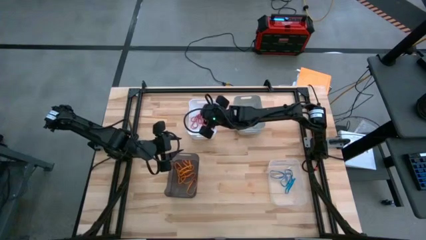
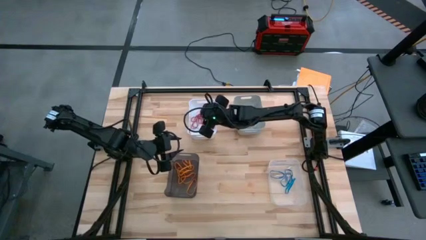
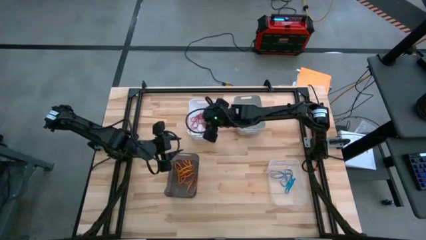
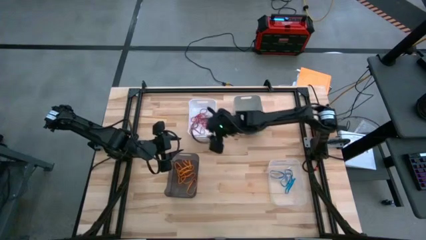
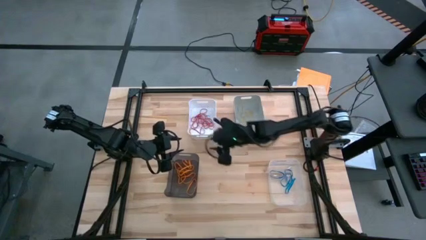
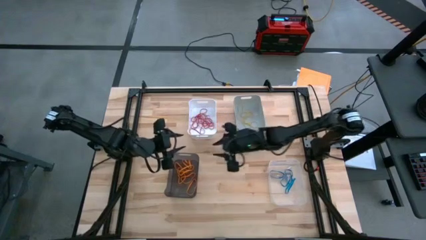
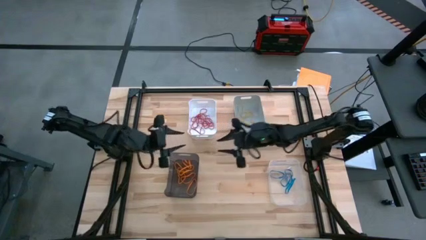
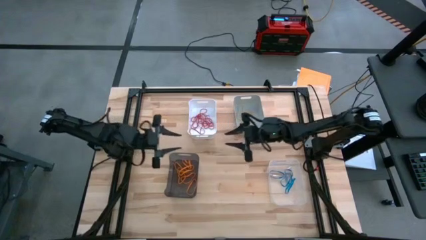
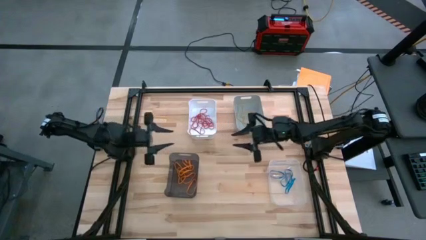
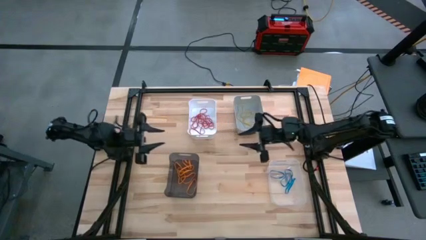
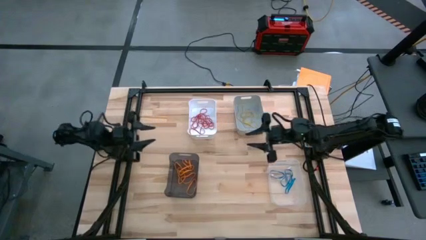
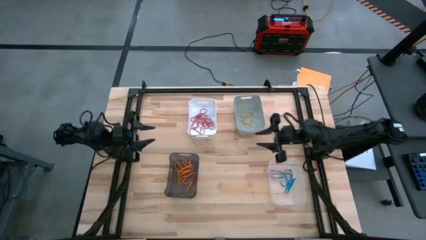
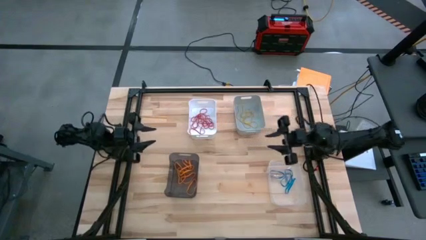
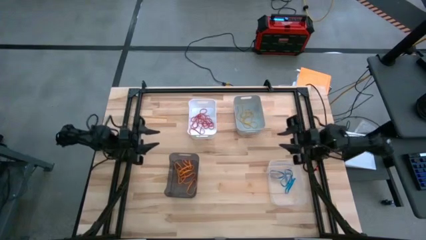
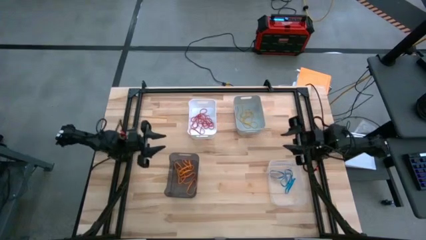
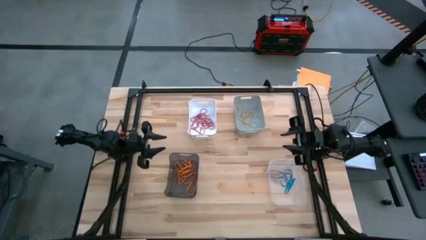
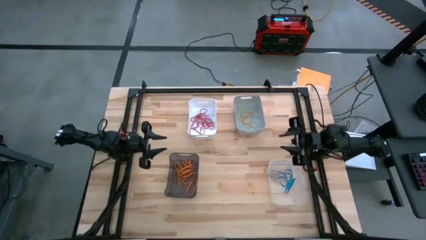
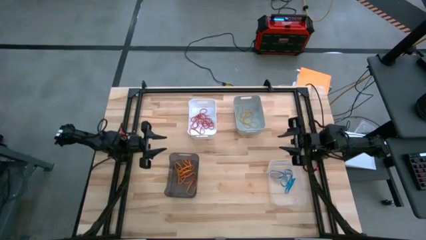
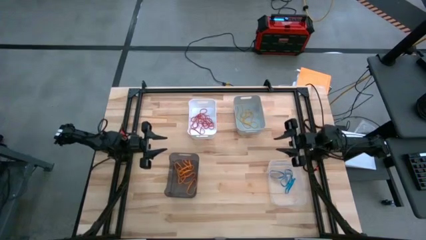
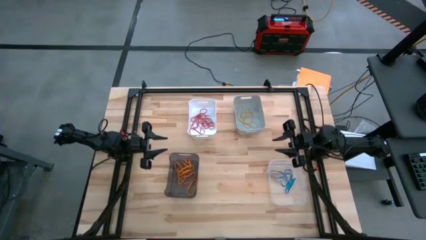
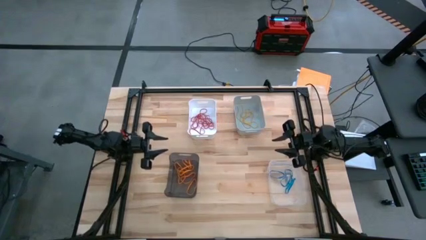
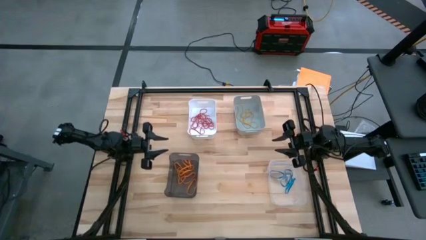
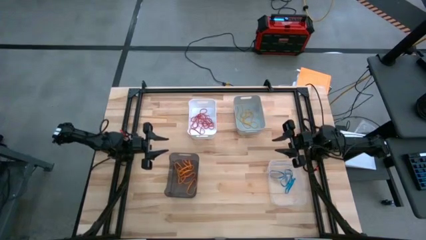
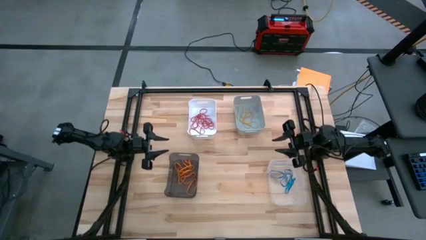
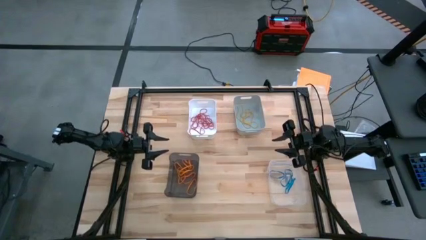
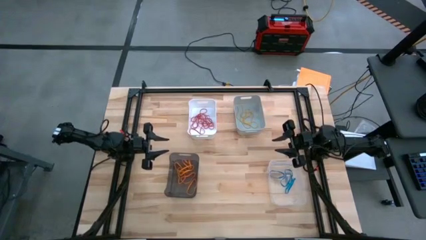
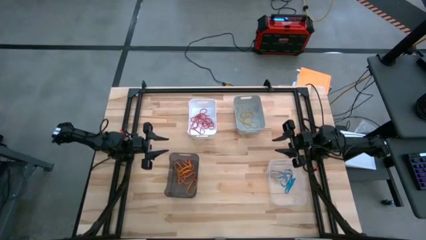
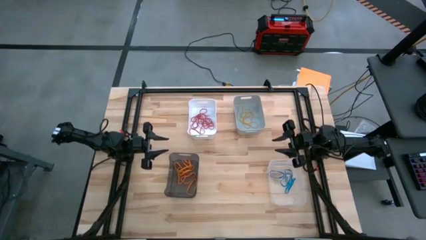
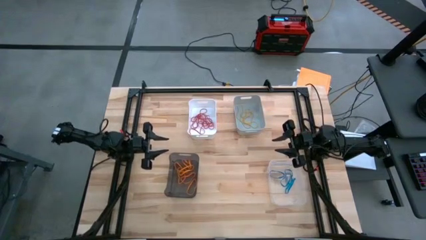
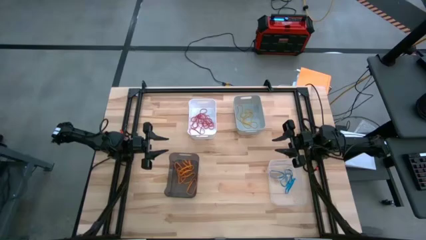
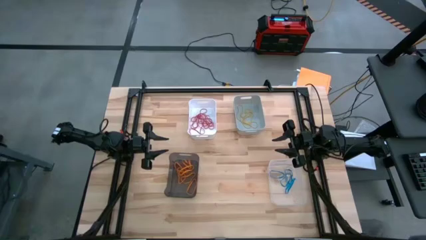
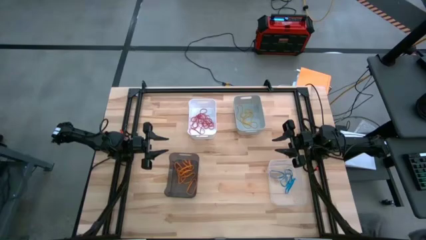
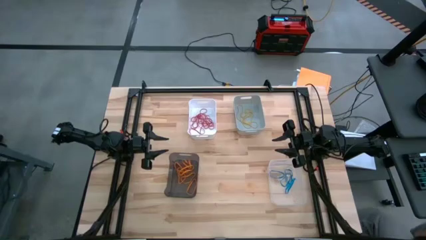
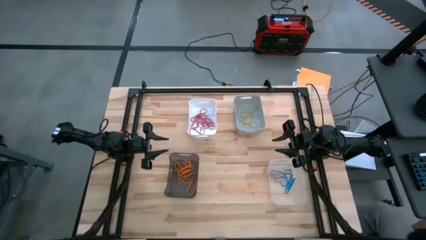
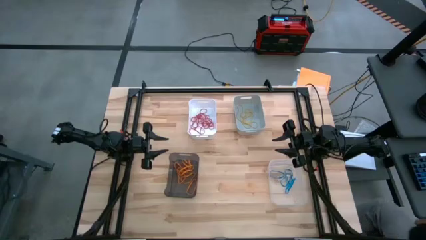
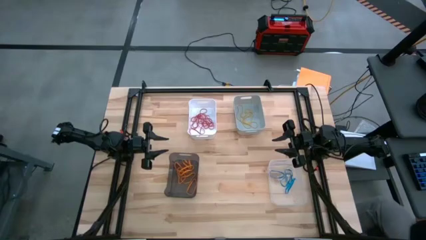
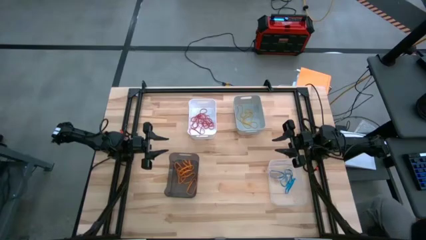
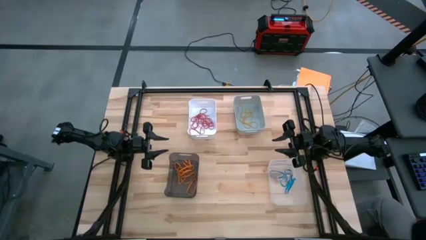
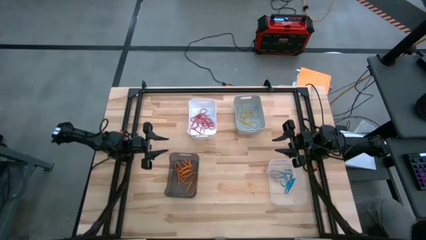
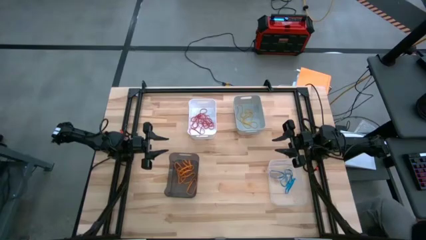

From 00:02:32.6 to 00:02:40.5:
Task: Sort rubber bands into baskets
Return to Home Position

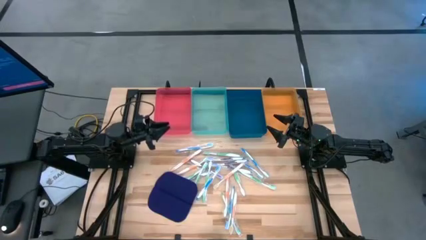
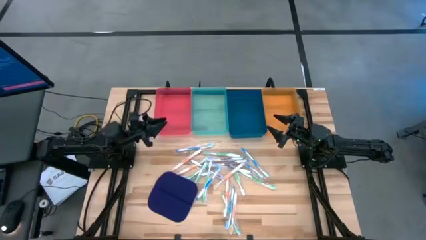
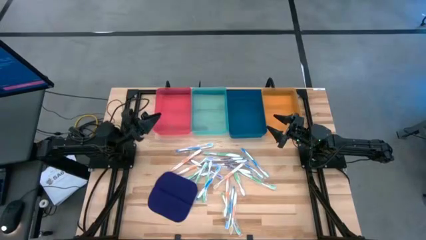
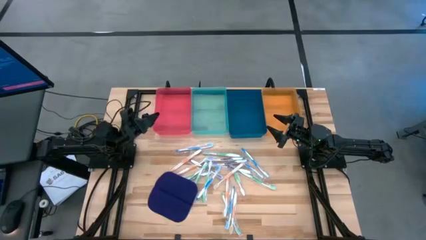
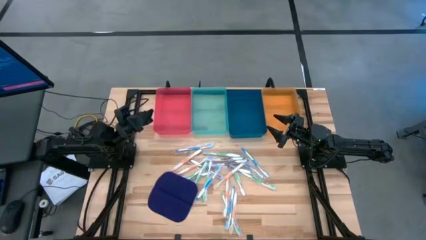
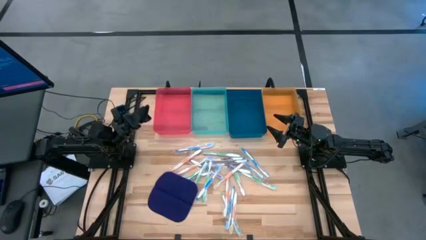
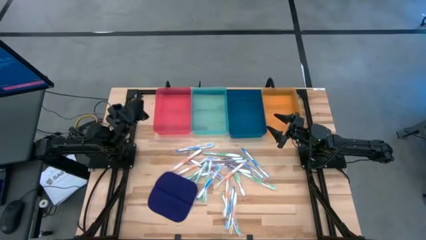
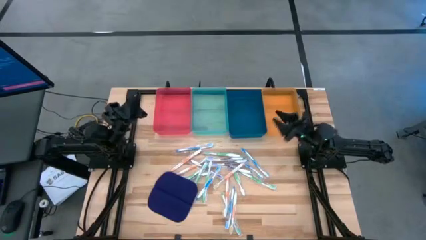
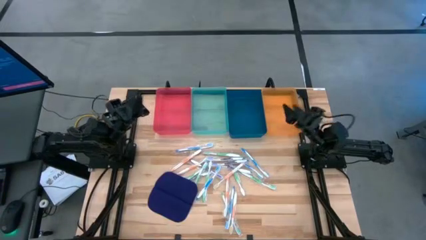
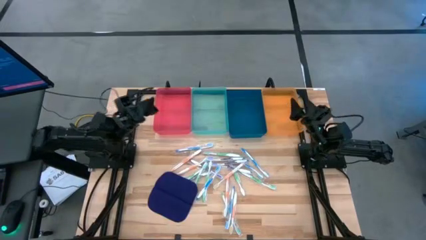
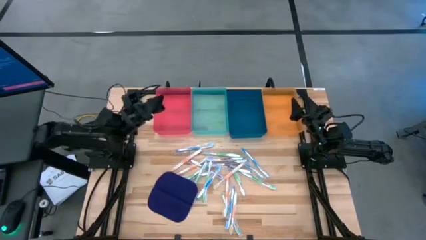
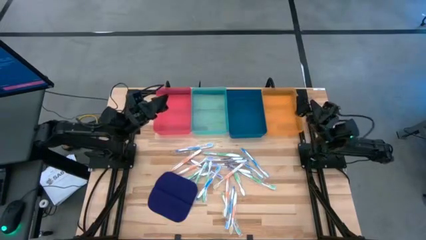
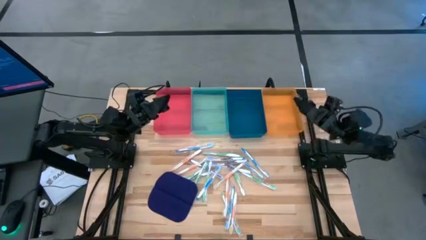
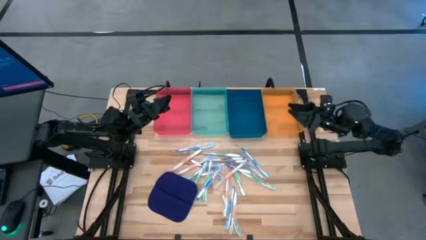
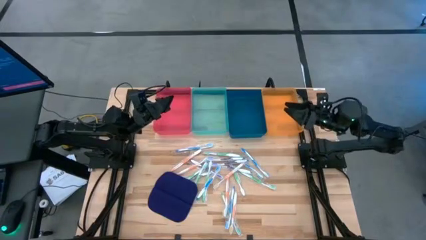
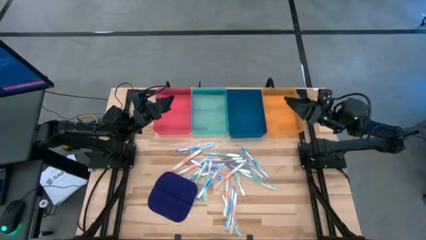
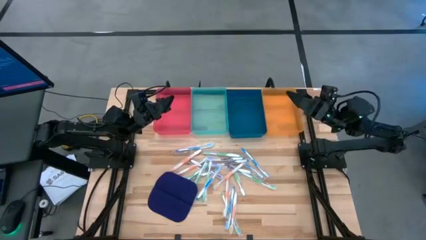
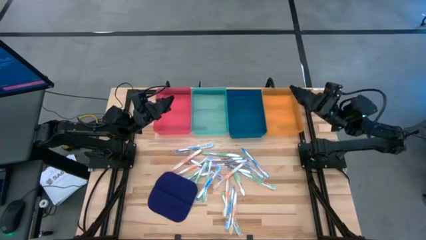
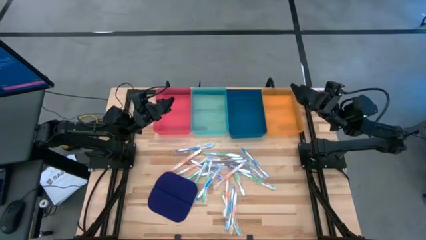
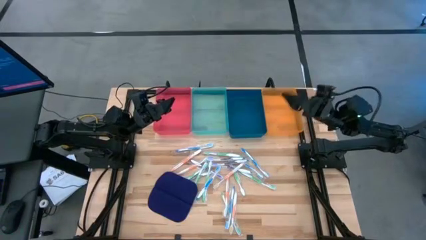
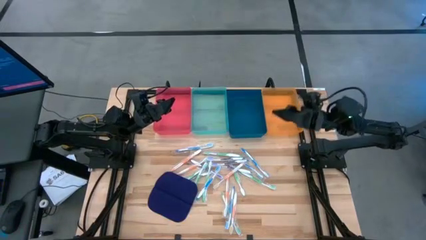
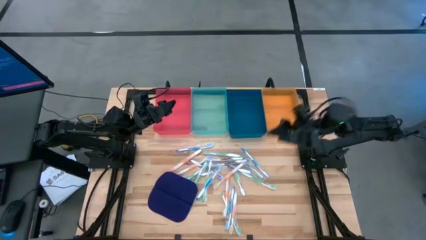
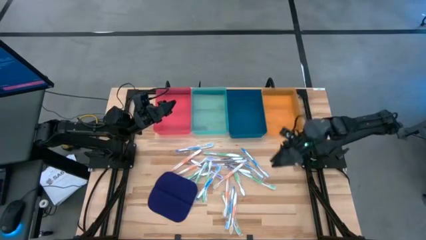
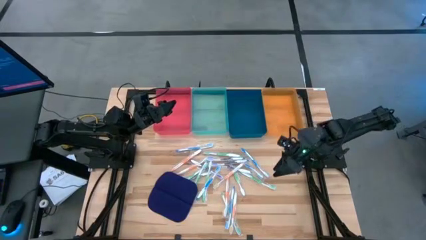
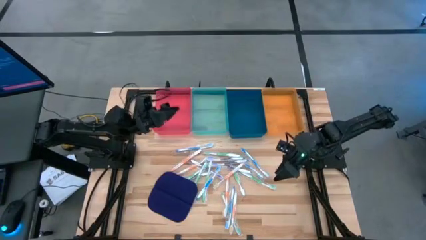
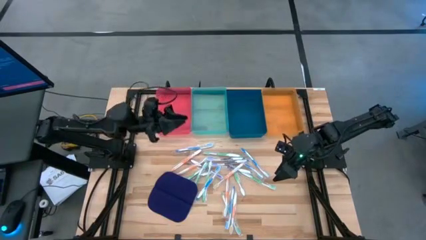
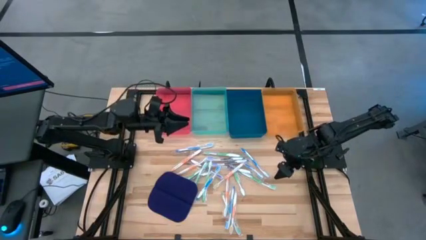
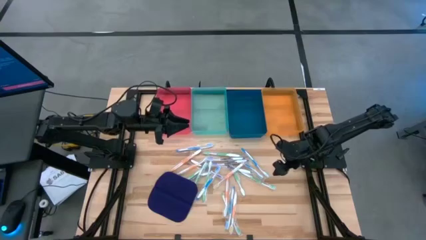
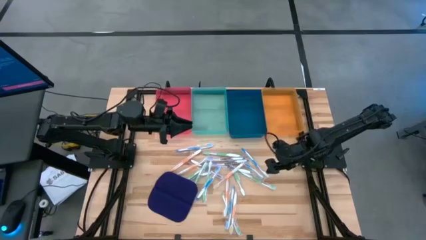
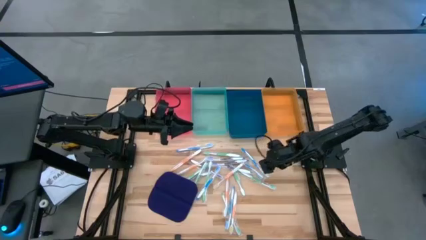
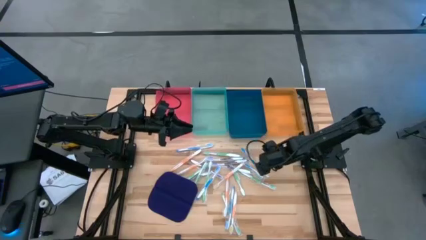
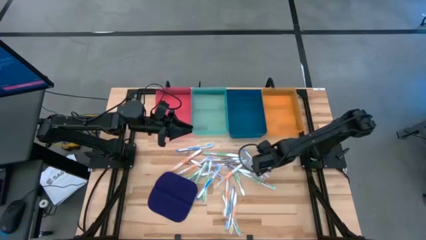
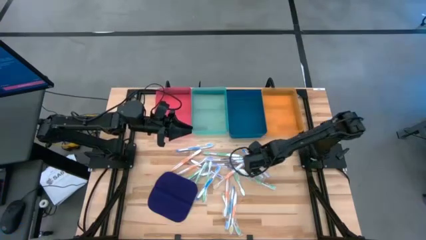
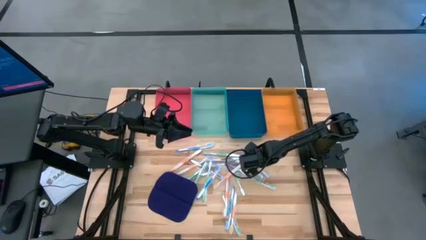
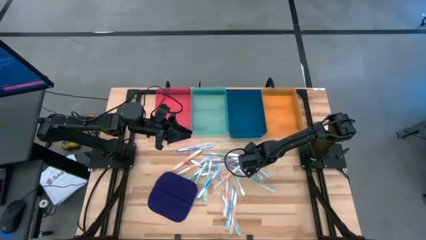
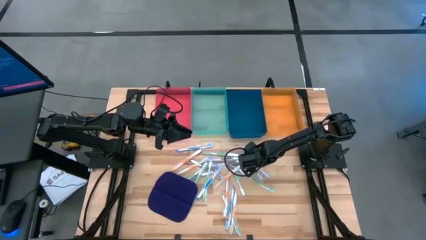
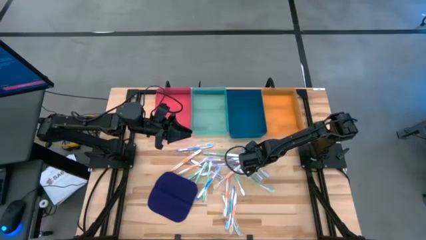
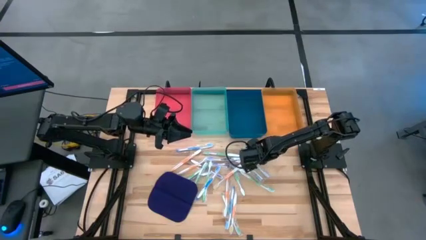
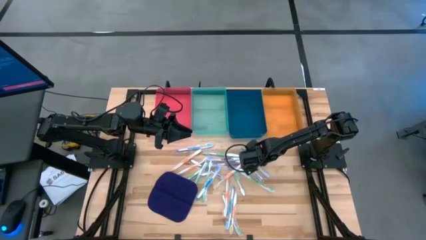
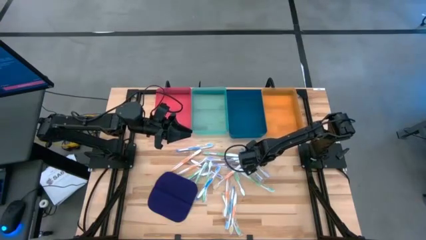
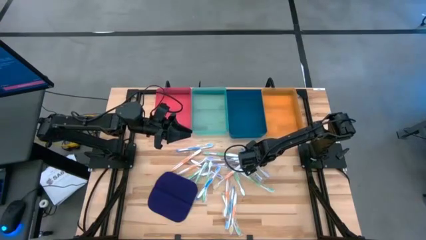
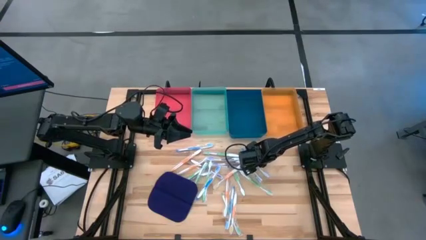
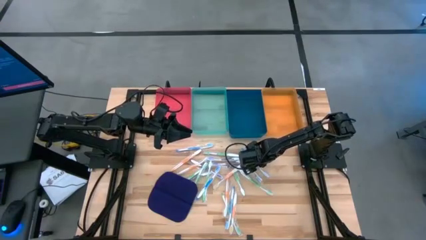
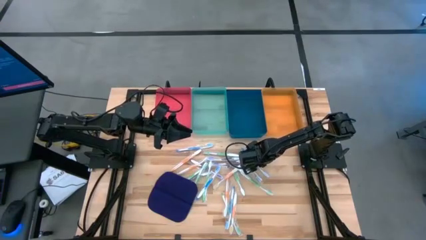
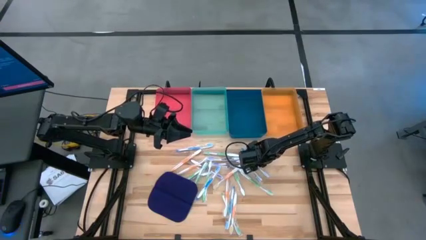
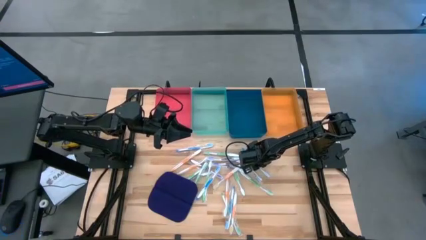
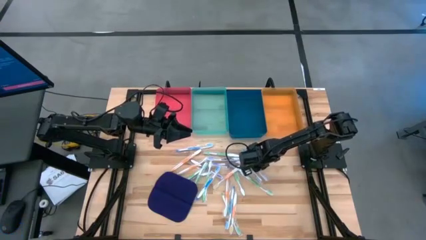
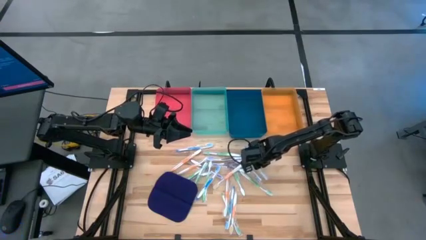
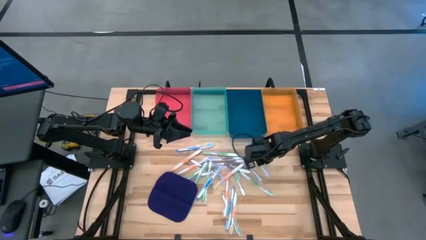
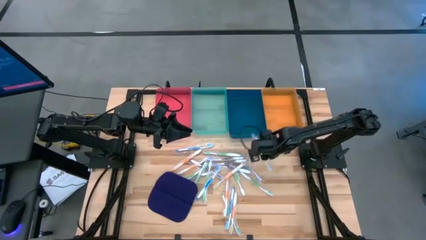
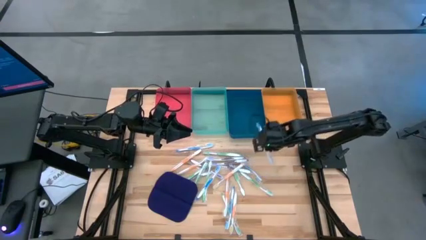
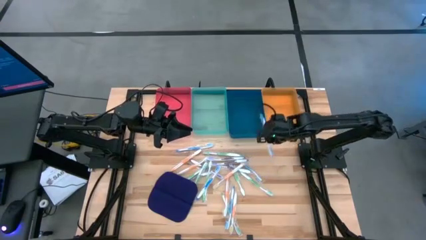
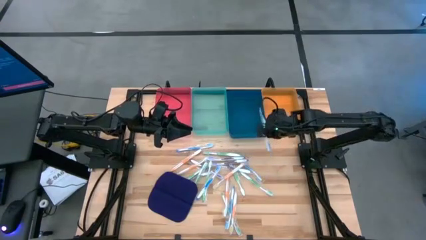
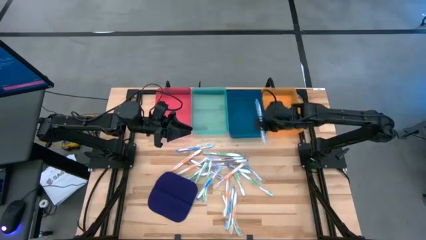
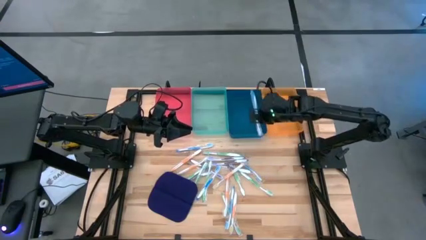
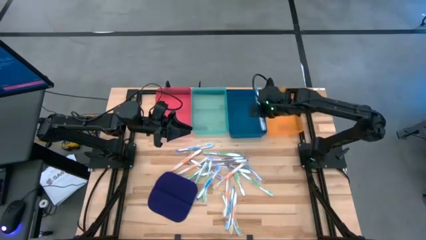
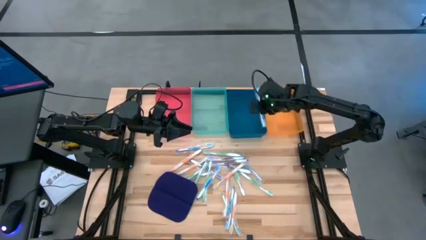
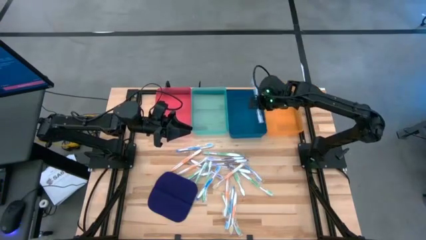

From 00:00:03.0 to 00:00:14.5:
Task: Pick & Place Toothbrushes
Put the blue toothbrush into the red bin
